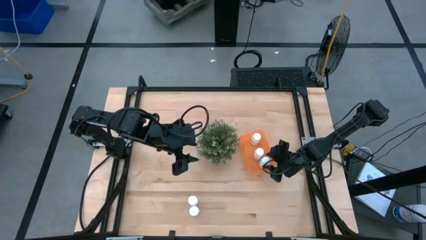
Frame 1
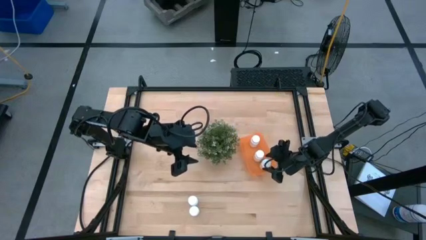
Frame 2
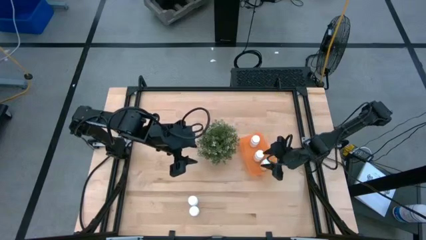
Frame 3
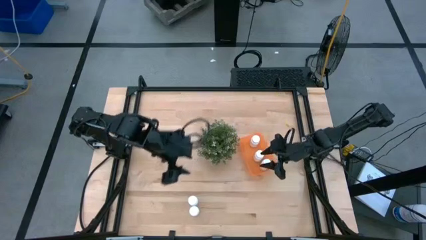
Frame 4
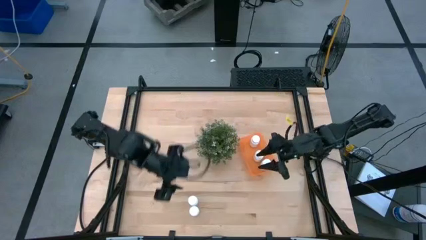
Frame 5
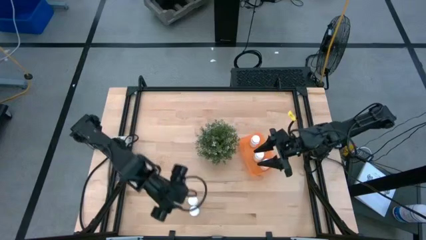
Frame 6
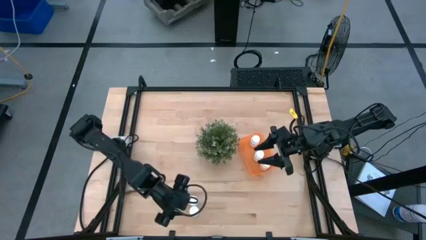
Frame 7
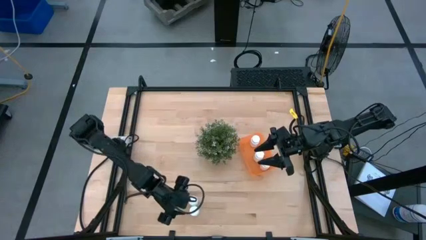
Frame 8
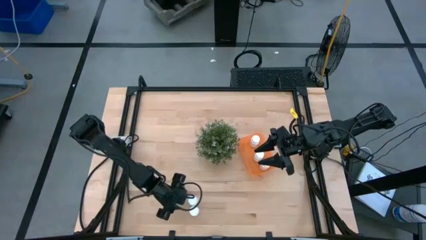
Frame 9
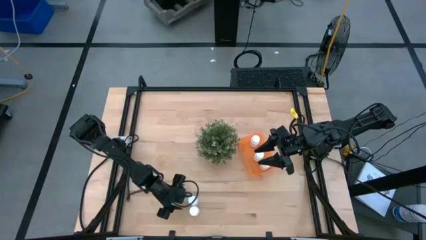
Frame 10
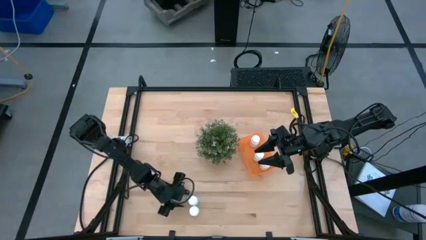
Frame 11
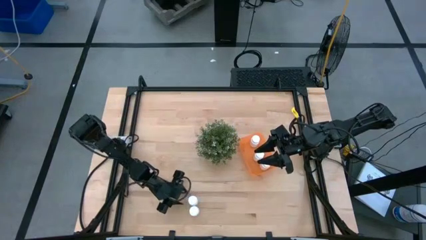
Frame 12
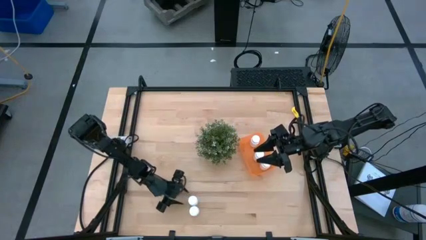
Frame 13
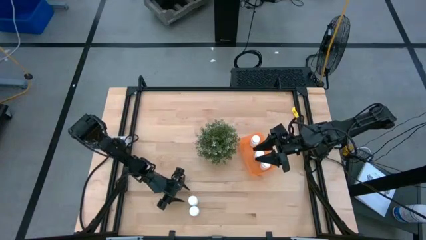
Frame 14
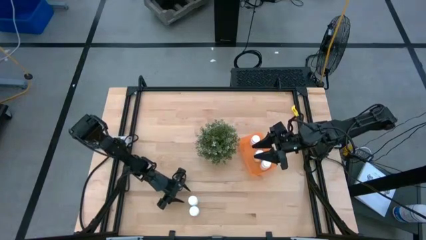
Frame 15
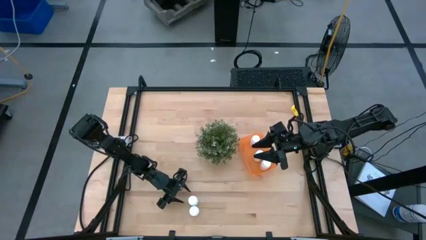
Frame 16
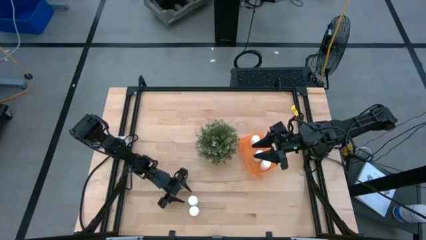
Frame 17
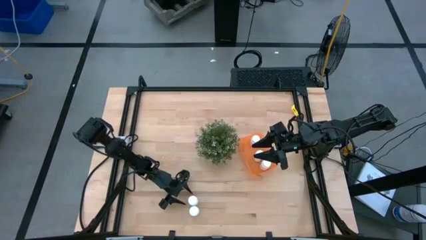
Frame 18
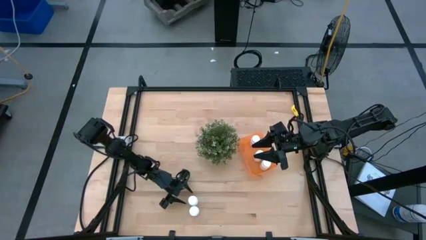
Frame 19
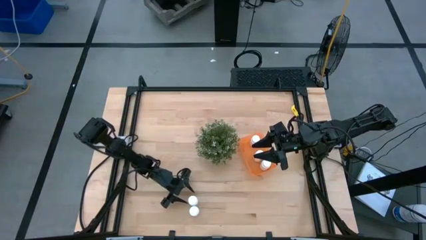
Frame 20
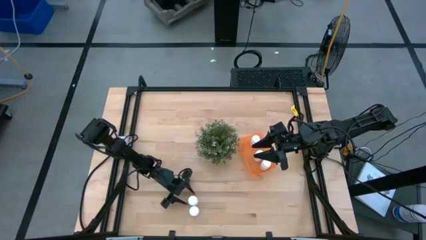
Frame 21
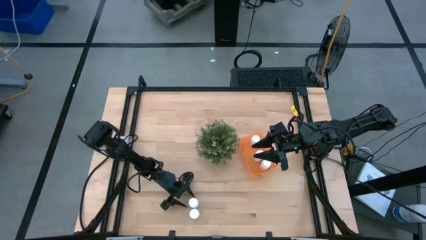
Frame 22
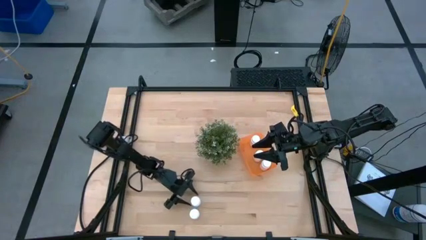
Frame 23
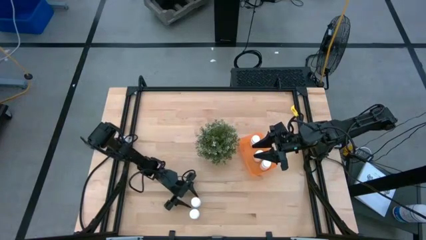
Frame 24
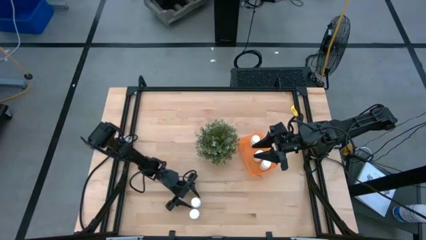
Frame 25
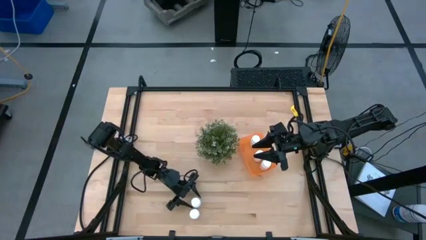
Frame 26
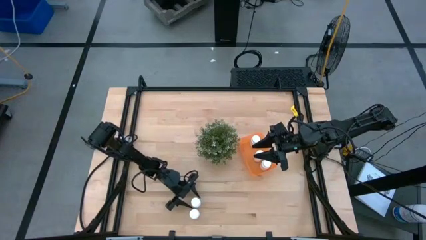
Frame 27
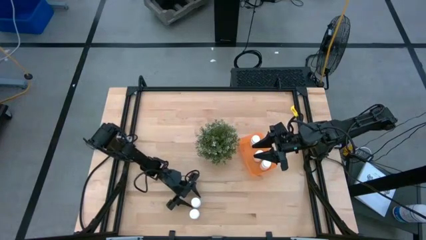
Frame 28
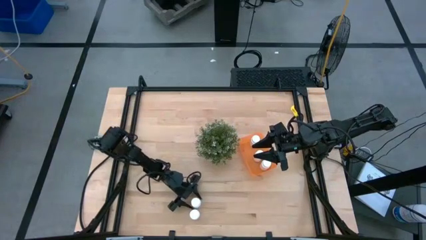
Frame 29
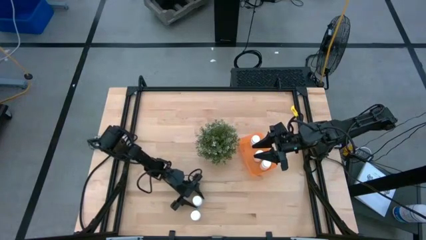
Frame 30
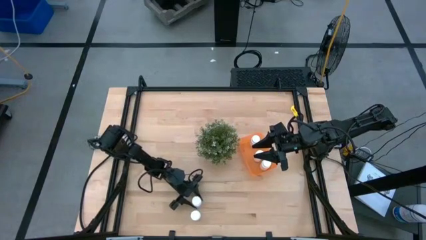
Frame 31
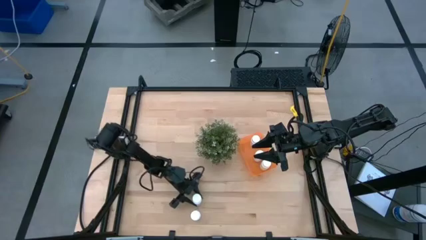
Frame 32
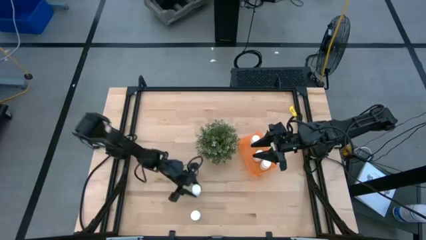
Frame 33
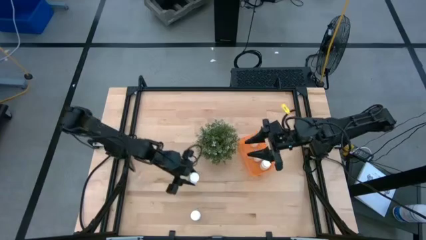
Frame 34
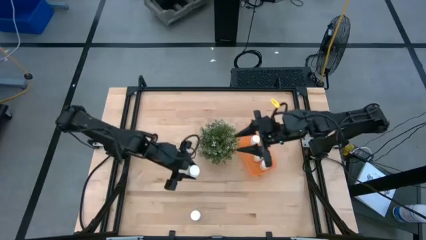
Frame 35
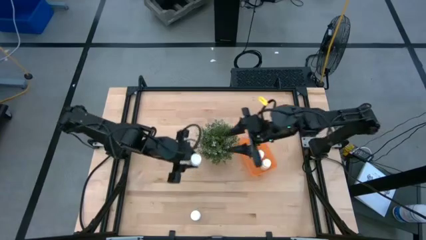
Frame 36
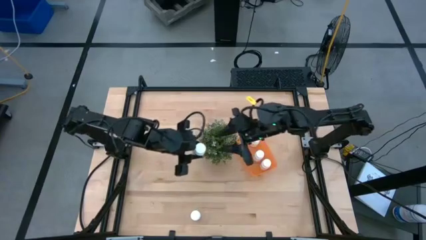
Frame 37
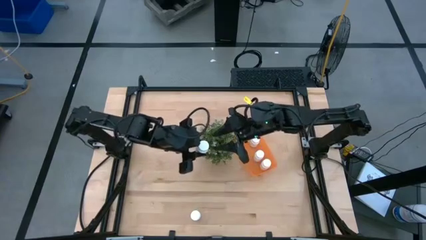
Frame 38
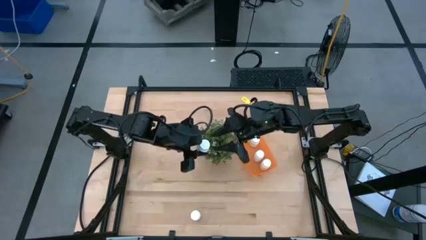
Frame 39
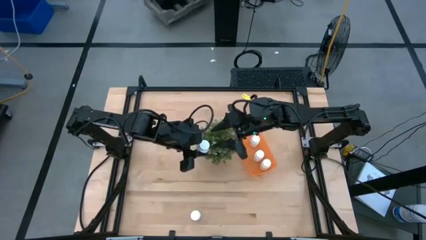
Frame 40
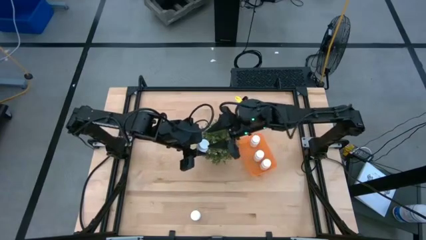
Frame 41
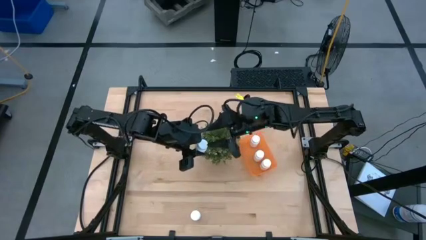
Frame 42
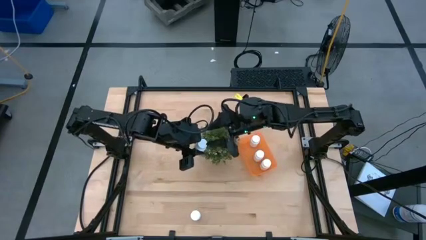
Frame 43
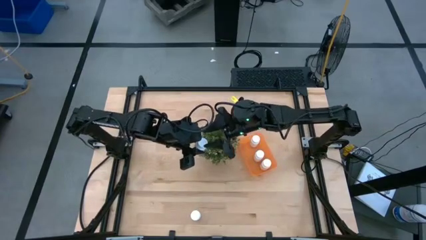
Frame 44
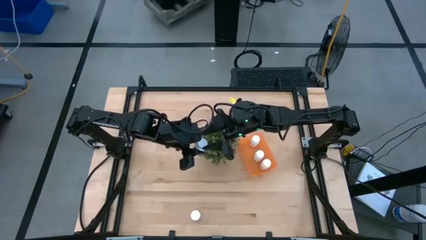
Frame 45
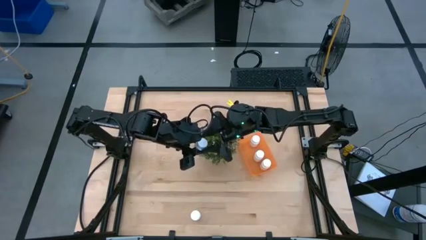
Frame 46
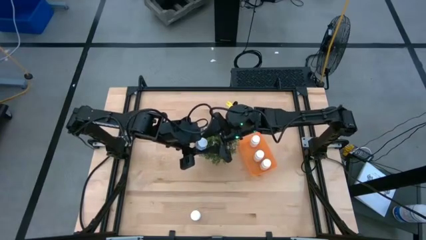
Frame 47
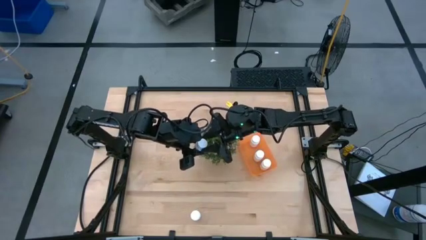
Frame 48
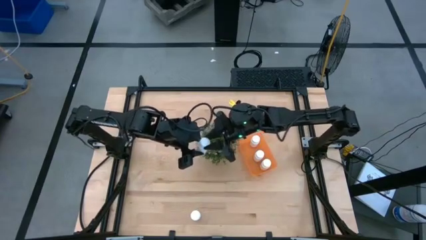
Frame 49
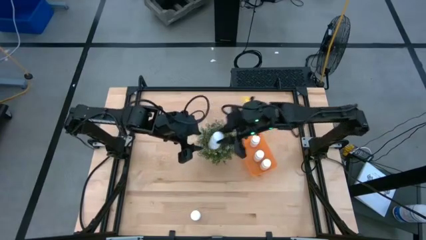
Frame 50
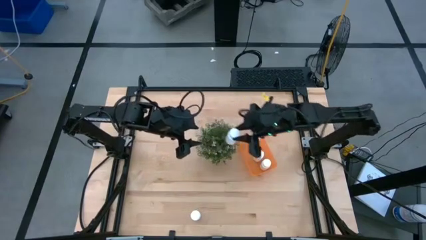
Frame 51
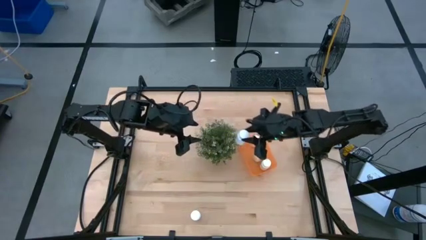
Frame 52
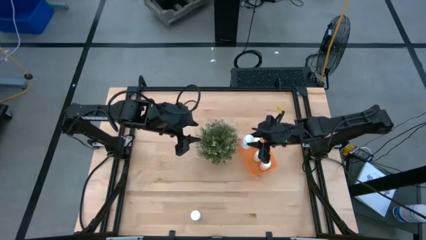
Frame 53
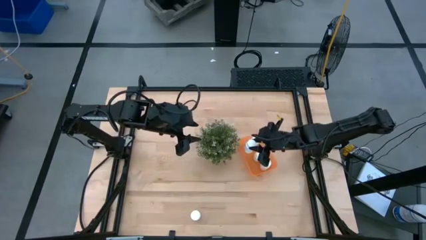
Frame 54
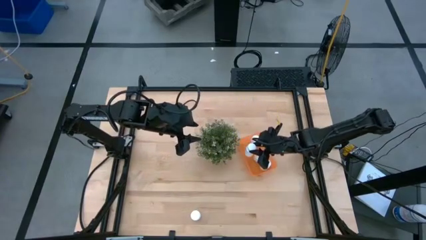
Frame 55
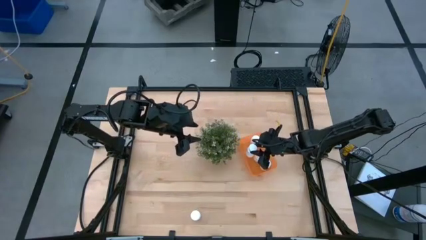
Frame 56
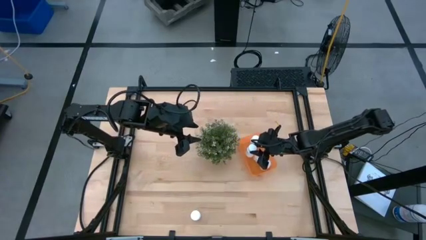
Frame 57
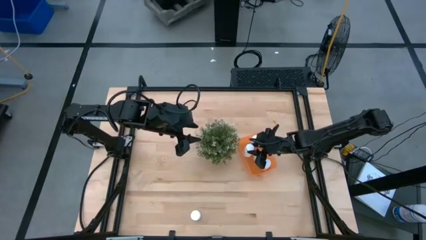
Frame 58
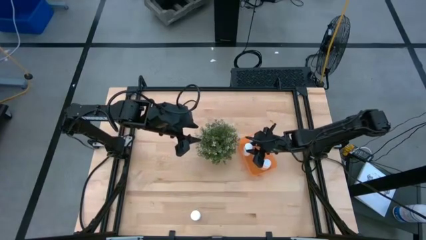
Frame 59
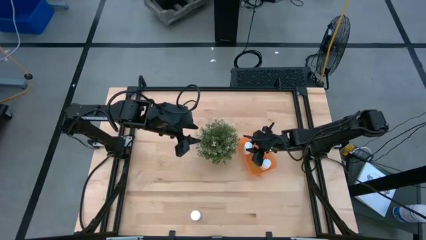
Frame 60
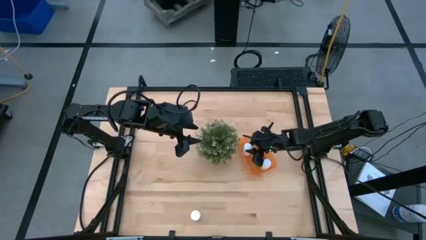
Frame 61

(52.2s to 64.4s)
Task: Pick and place pill bottles into a basket
Put the white medicine bottle into the orange bin

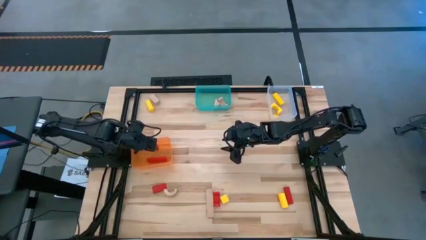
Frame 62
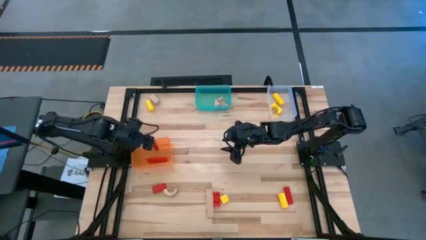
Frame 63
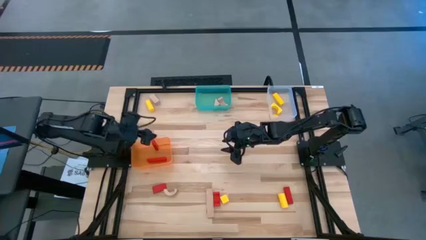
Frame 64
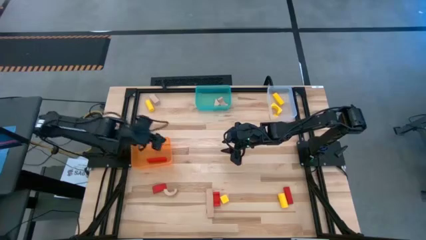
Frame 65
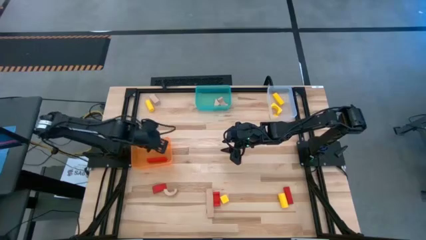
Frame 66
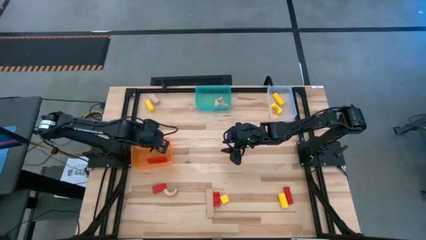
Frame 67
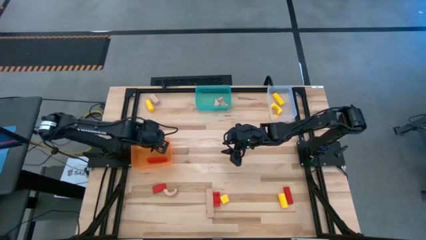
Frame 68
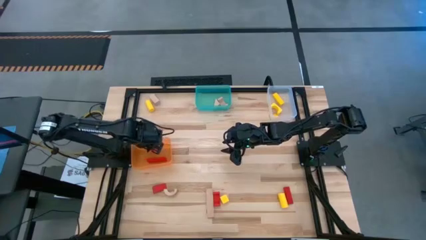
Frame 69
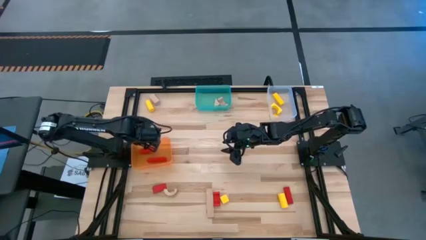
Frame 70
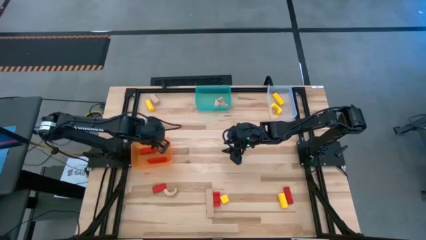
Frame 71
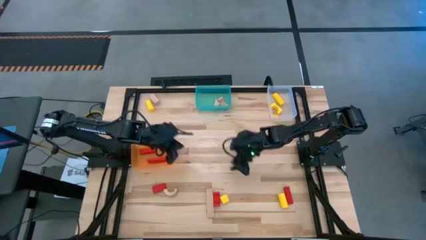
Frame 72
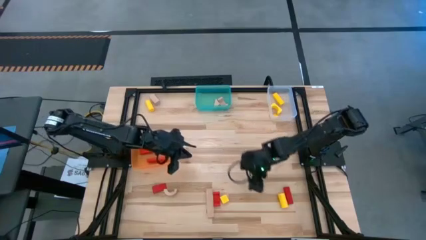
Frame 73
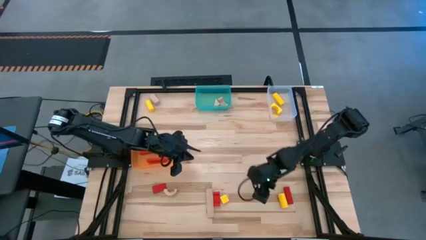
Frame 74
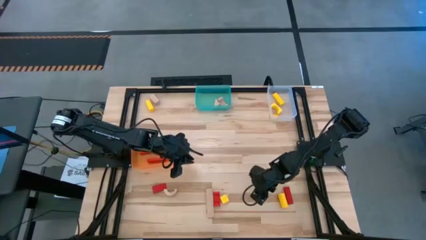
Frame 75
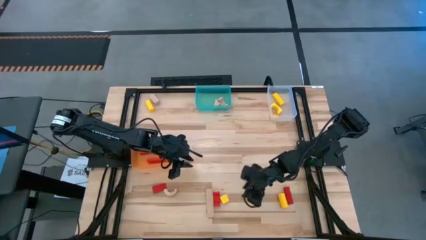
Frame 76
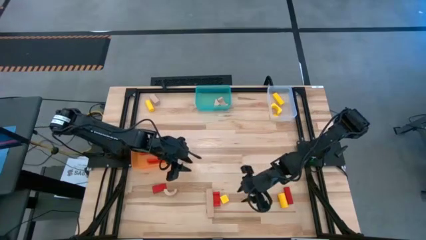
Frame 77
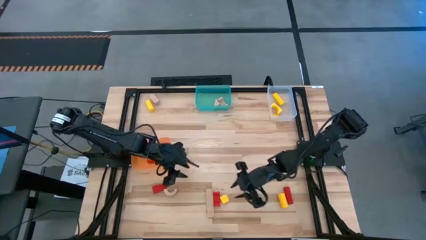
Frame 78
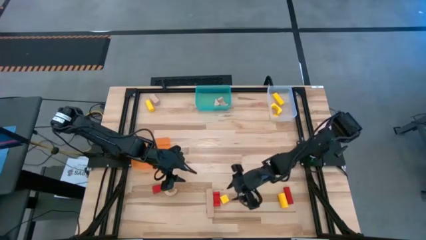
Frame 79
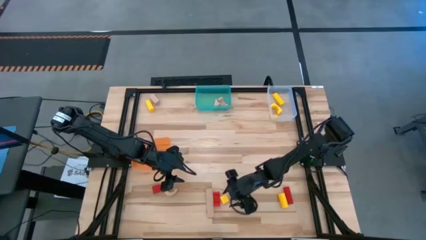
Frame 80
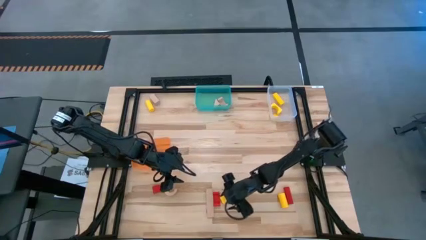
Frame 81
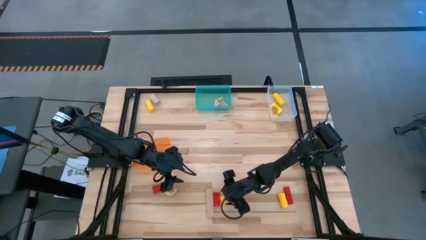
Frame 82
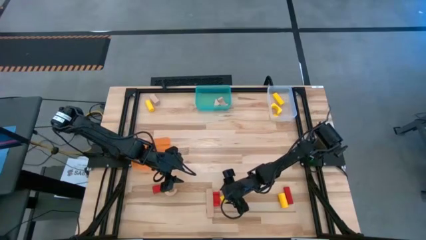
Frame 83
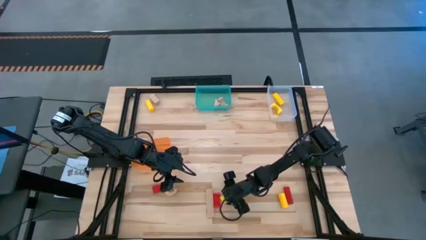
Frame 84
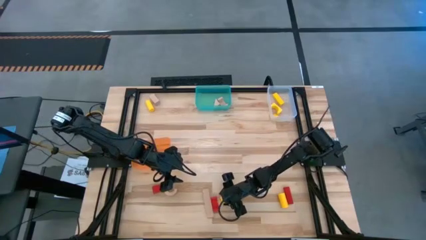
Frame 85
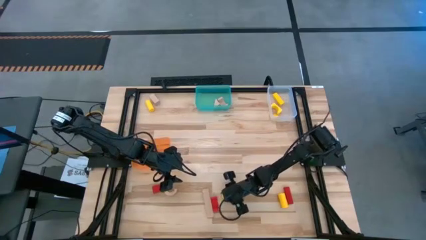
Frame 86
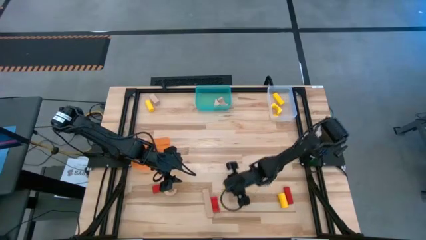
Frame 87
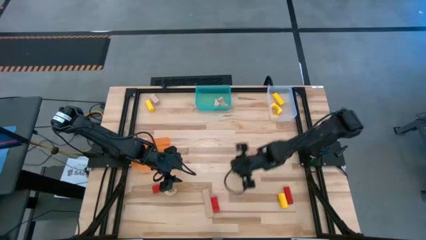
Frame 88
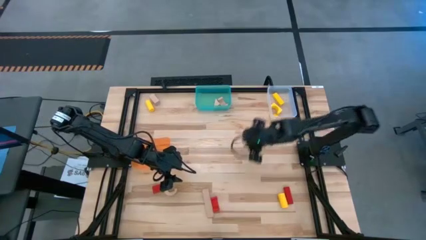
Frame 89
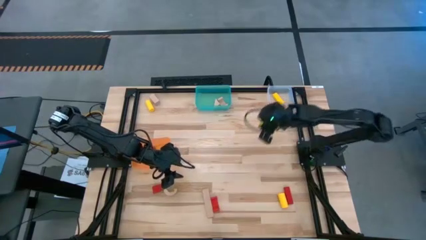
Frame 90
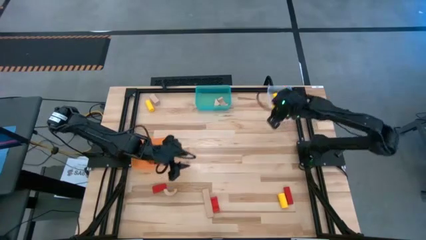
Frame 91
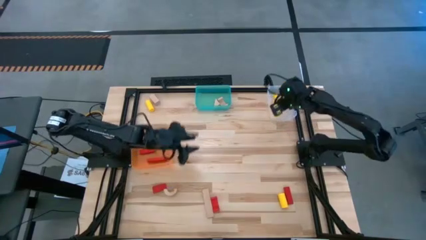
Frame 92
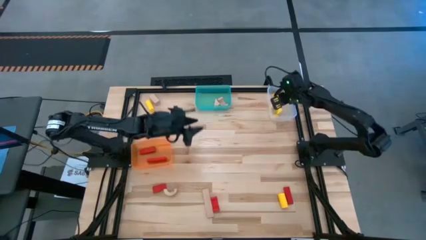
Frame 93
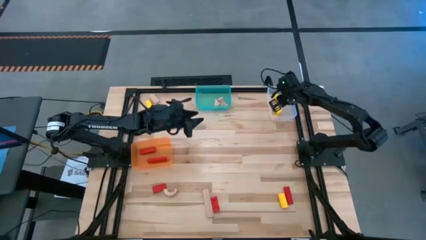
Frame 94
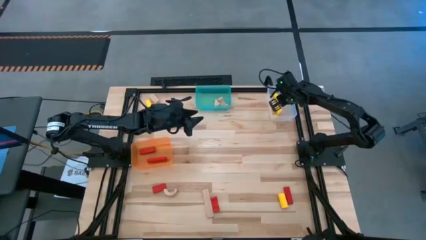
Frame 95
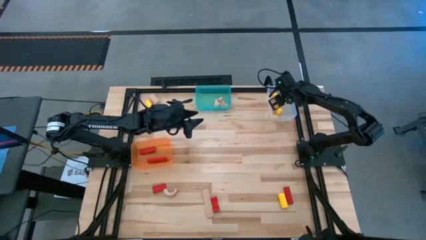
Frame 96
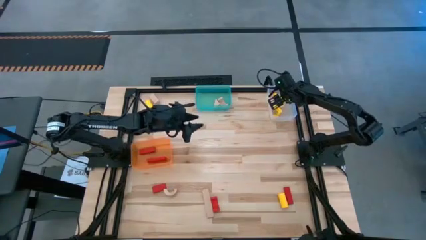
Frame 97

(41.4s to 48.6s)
Task: Sort & place blocks by color
Put the yellow block into the transparent white bin
